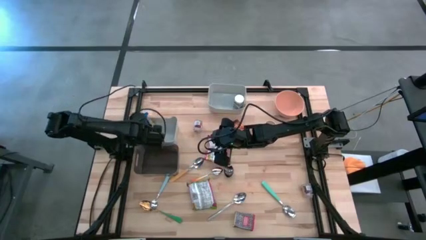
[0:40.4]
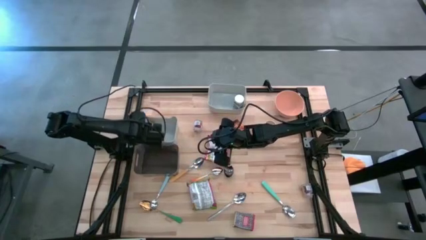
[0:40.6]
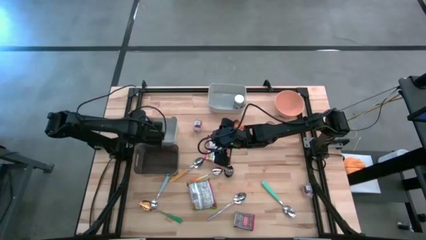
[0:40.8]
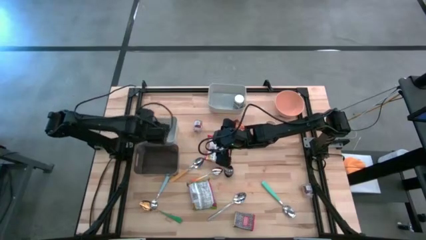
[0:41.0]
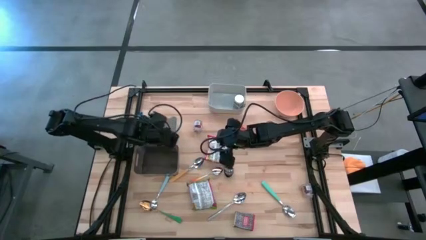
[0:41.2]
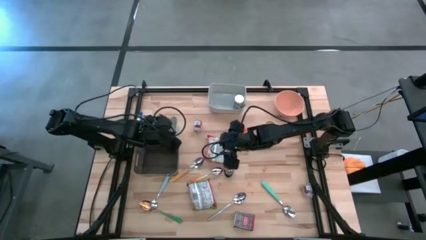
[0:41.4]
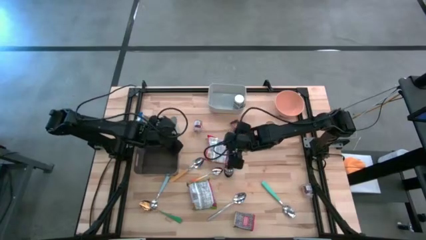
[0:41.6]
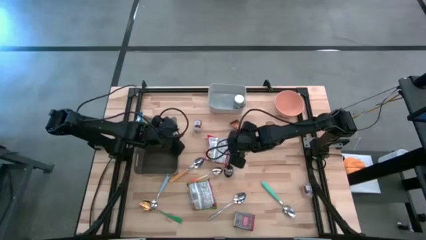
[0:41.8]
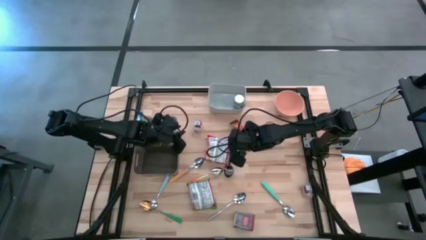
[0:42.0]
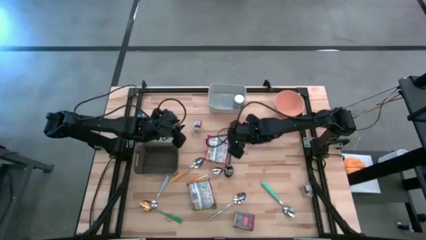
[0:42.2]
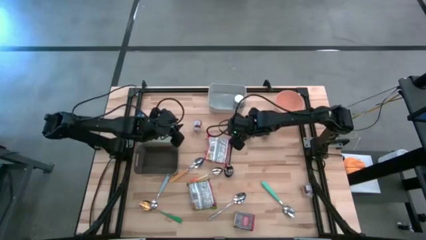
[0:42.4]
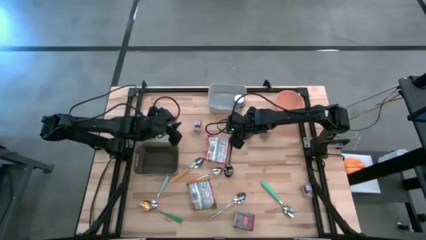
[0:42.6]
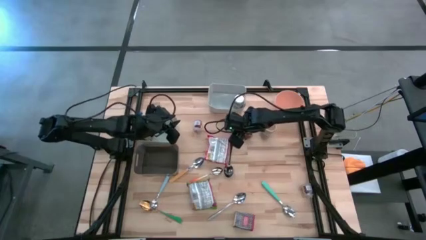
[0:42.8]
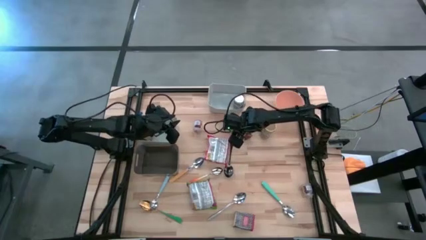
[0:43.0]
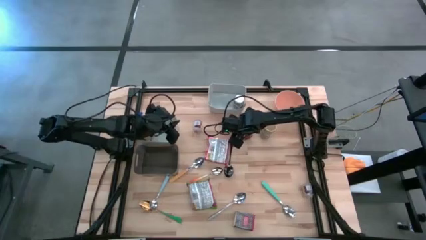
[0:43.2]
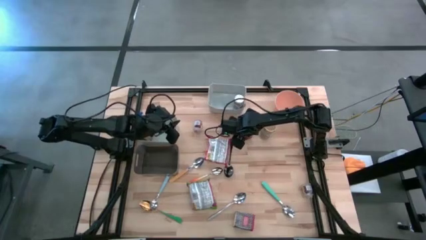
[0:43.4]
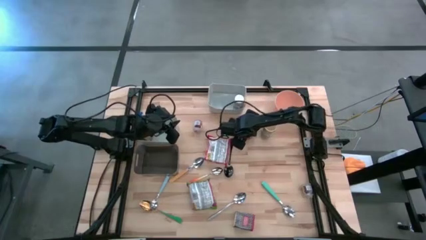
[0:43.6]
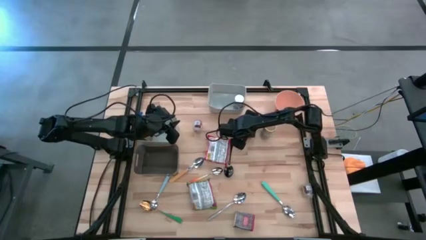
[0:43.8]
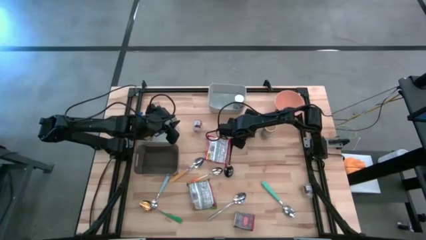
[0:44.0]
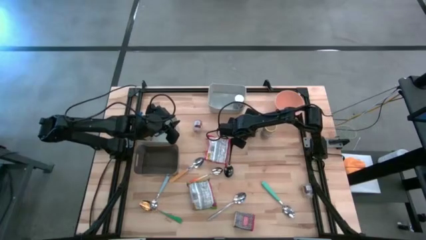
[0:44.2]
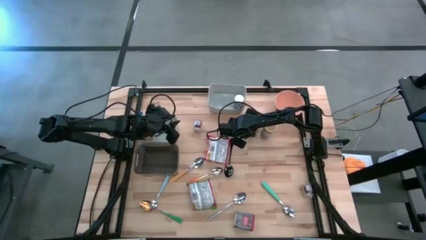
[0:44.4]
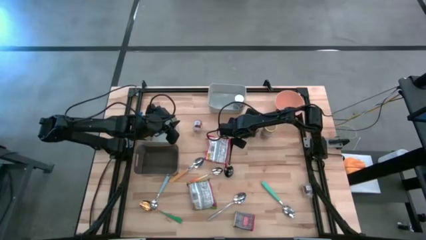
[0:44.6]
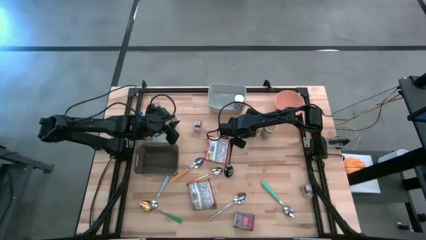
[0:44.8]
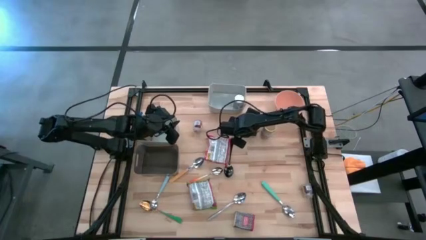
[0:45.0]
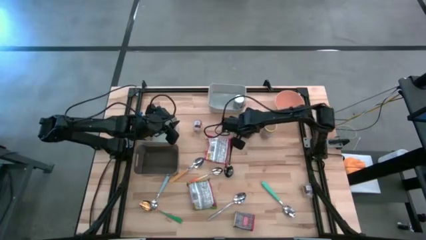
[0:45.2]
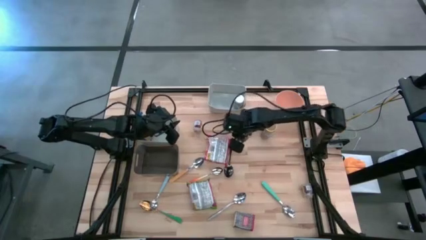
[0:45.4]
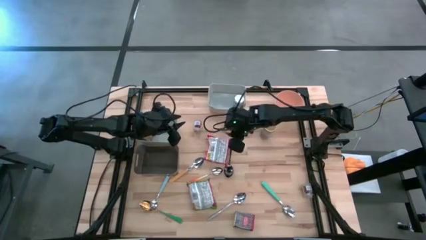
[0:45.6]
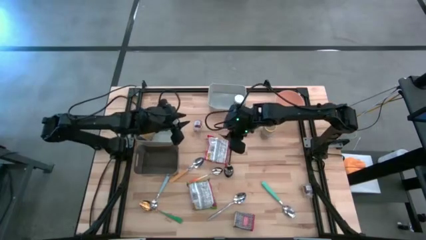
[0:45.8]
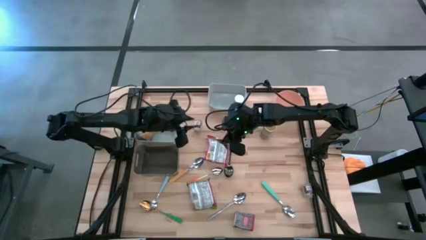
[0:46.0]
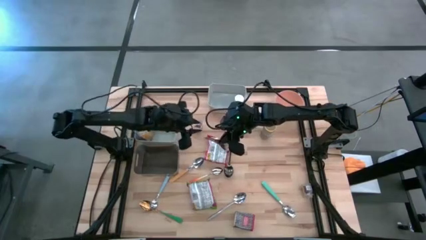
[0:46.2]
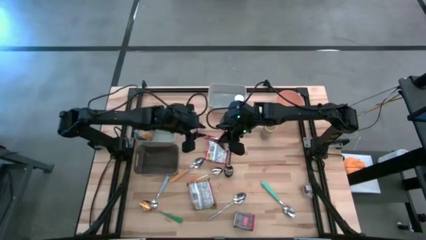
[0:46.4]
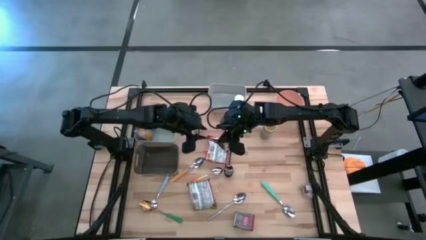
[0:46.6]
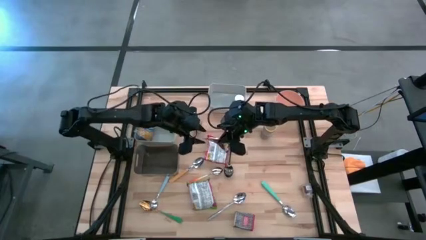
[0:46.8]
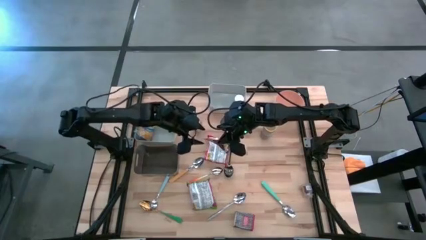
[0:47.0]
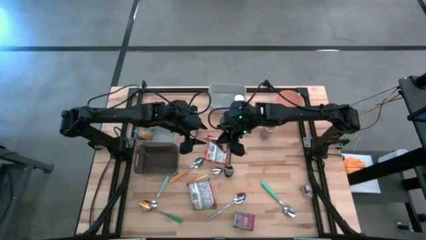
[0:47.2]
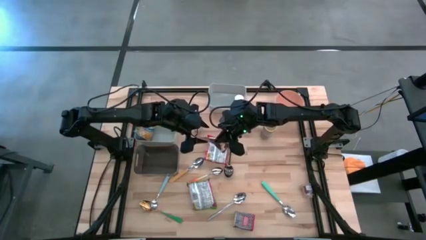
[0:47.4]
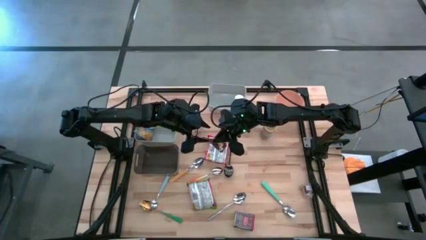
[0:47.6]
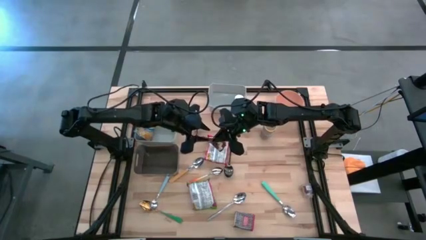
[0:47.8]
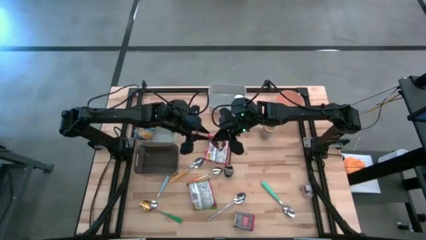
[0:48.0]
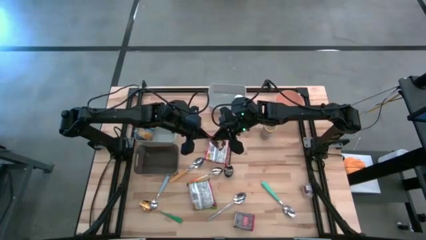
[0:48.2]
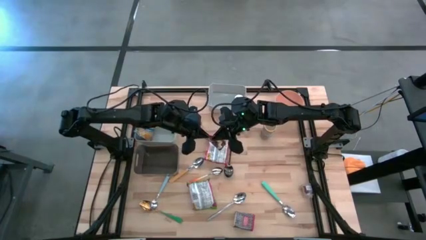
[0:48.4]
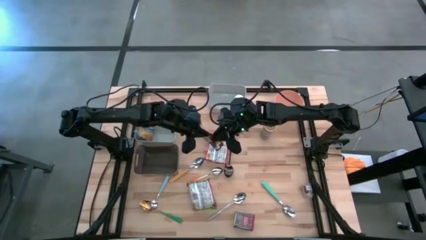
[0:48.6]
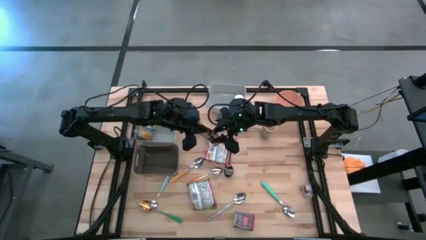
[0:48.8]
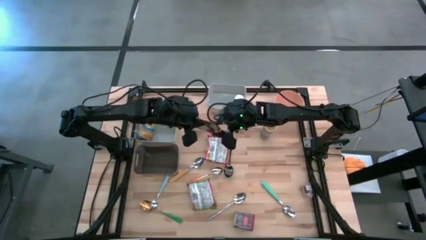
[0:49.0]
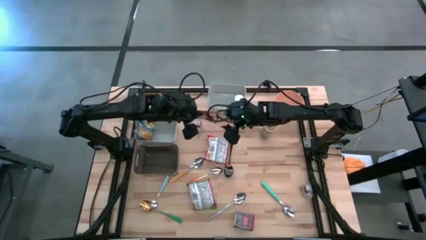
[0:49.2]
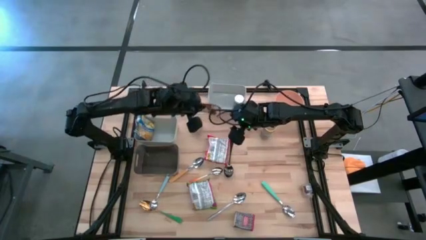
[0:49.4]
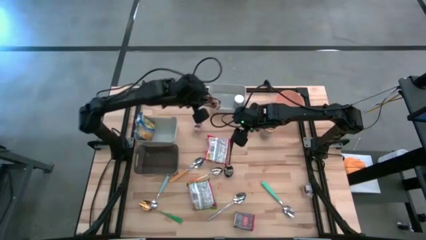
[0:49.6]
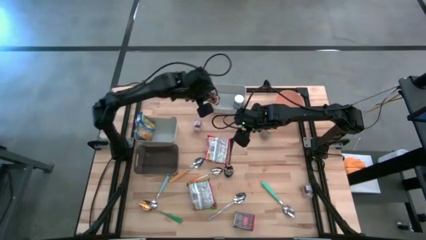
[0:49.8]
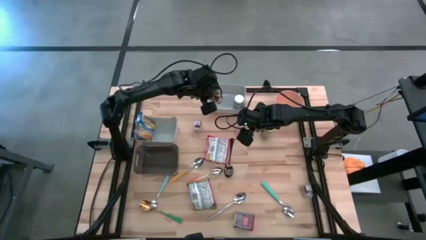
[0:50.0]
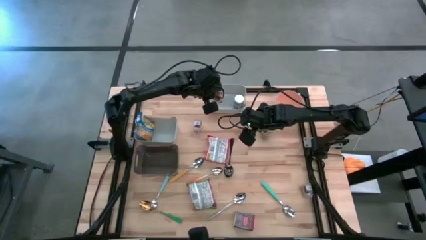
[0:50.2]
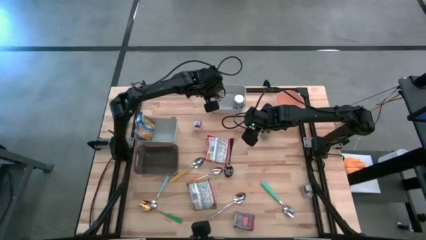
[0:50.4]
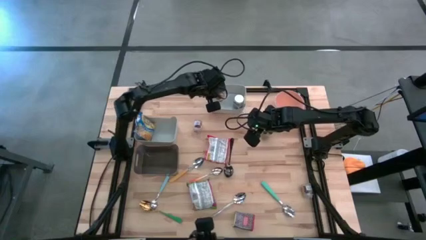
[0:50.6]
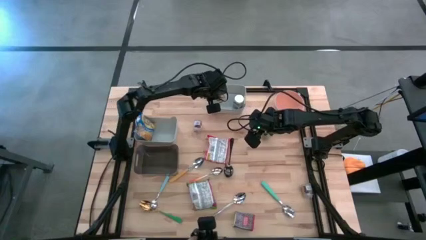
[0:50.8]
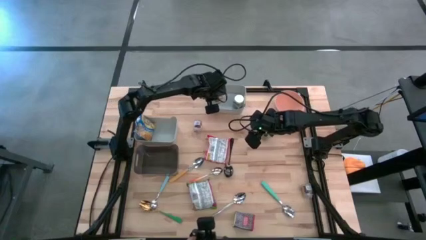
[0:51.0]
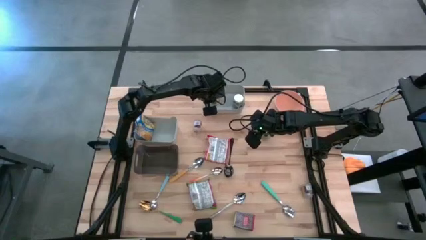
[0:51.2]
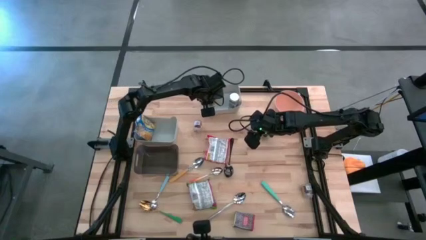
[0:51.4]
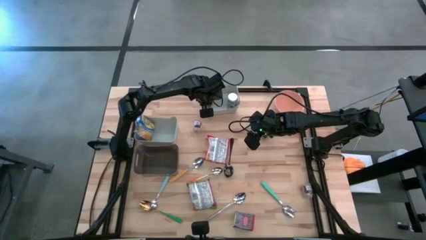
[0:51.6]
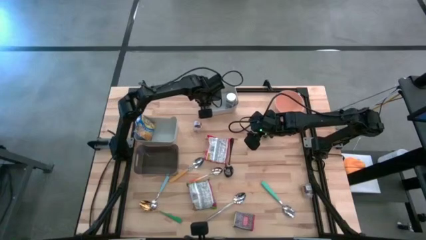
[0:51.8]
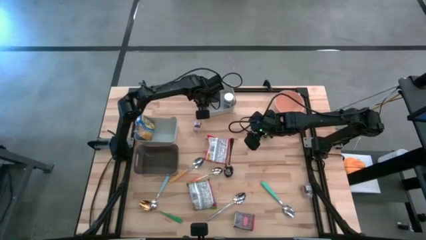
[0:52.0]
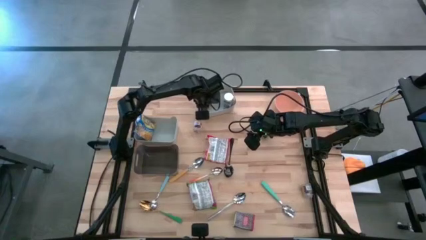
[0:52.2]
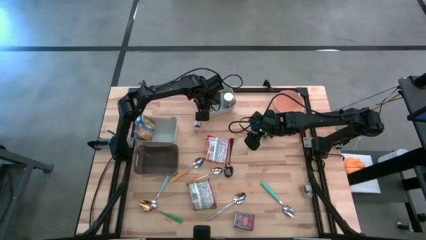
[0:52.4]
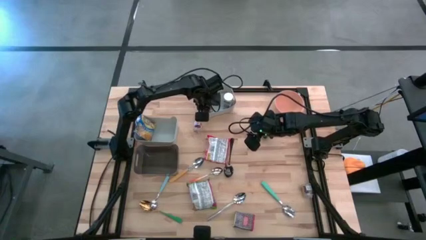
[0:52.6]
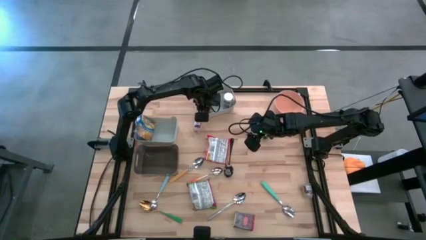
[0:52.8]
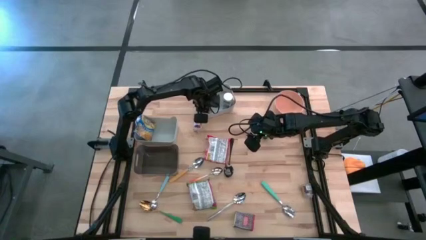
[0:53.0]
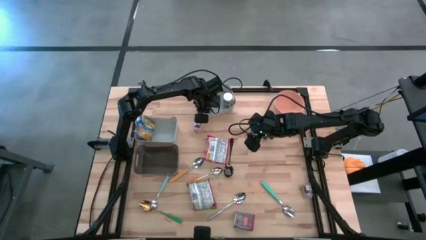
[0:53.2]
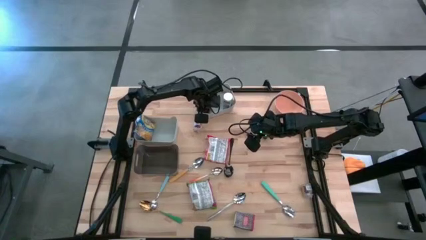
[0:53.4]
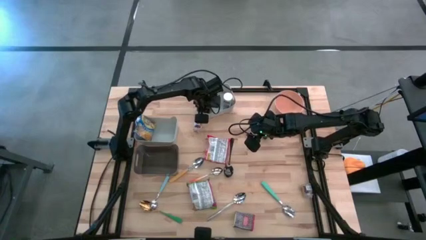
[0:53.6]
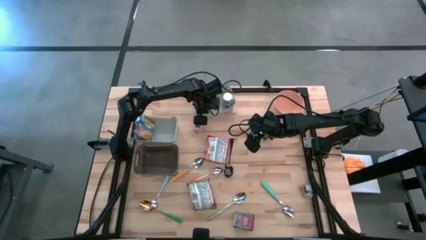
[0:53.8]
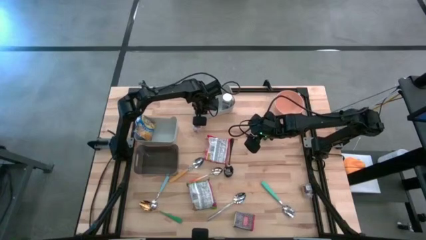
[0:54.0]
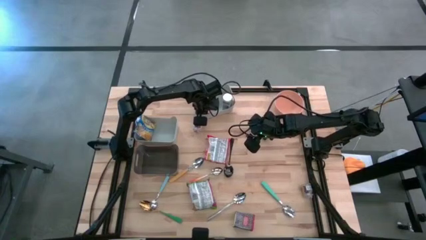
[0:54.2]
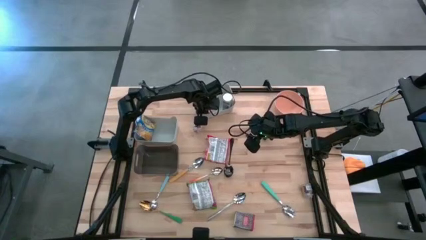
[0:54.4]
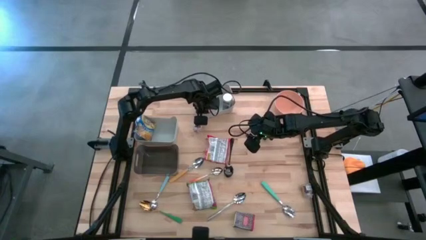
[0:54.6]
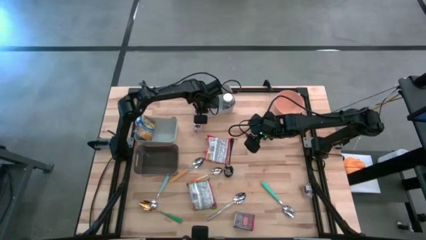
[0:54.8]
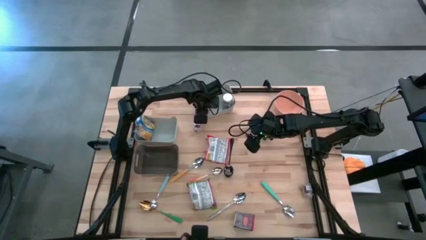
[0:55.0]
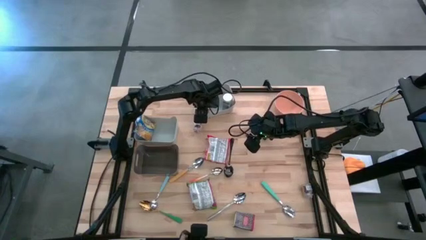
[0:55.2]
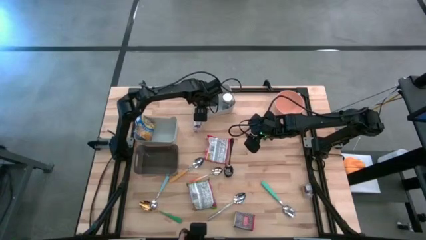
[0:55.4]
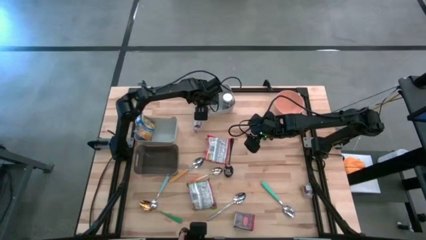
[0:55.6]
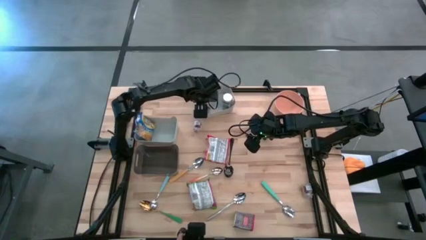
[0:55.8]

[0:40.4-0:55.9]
Put the orange spice bag into the top gray bin
